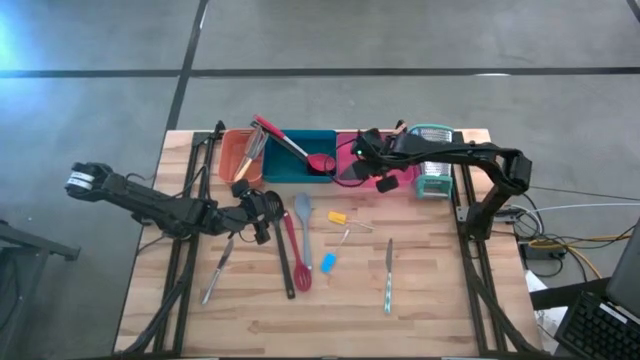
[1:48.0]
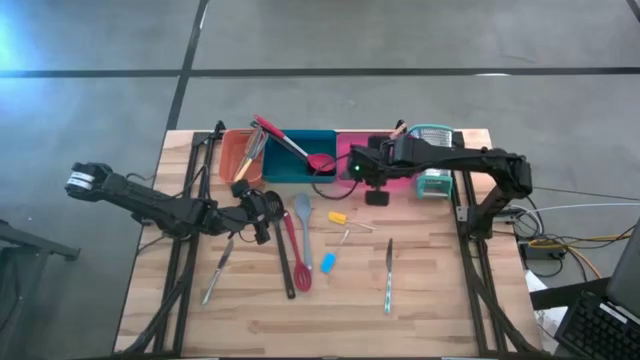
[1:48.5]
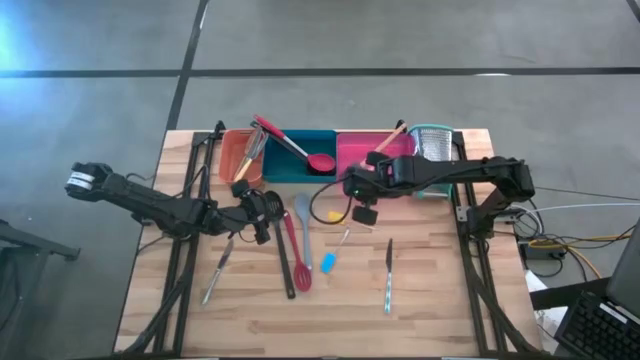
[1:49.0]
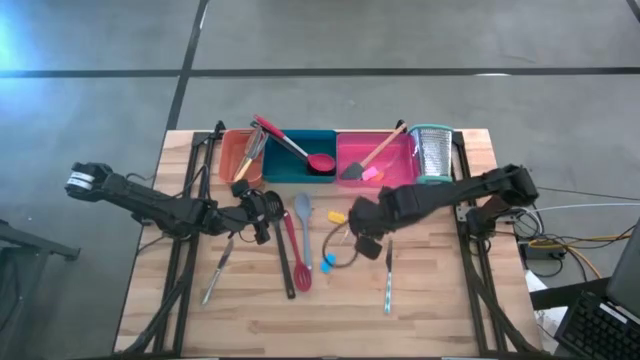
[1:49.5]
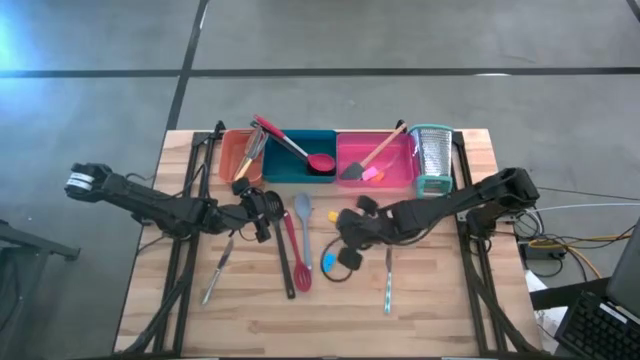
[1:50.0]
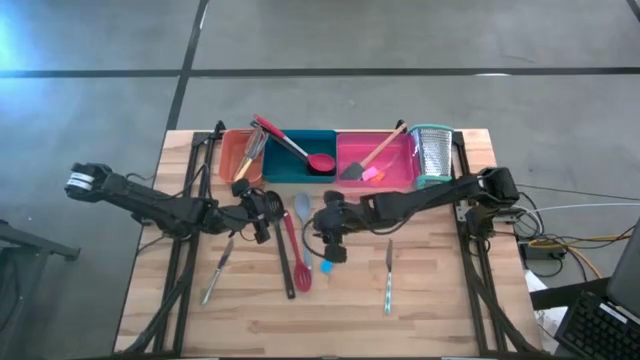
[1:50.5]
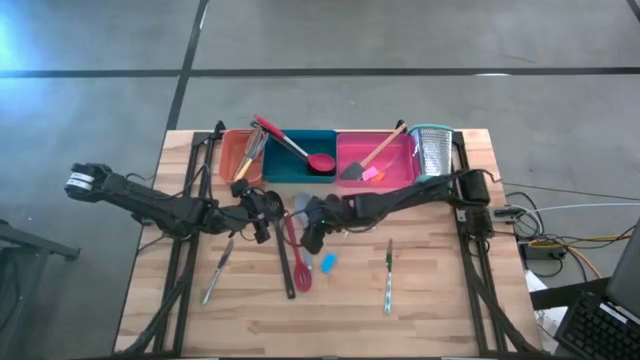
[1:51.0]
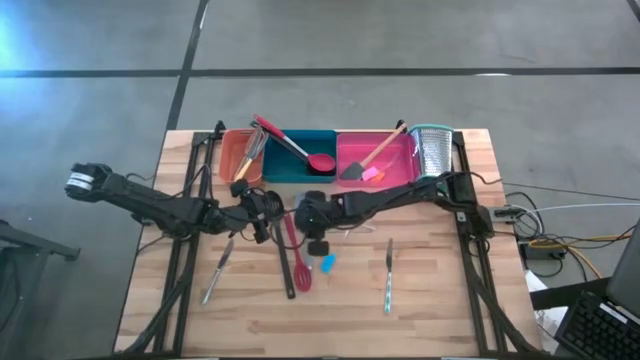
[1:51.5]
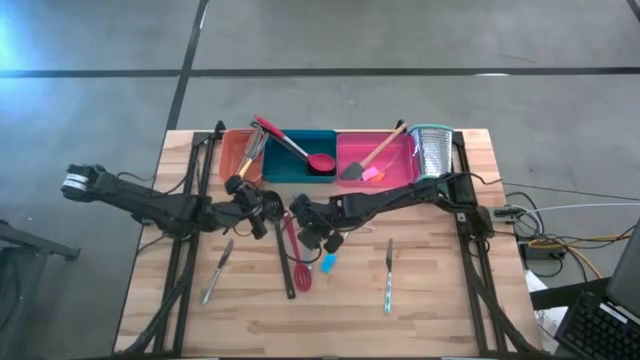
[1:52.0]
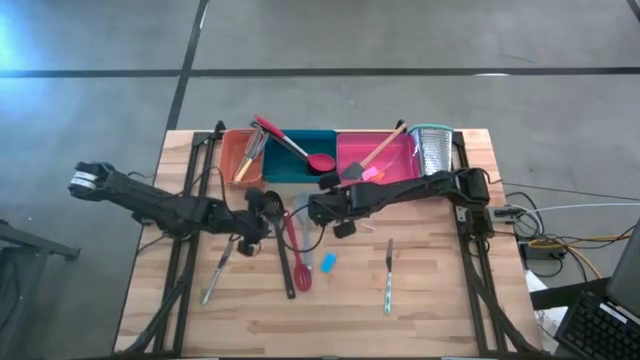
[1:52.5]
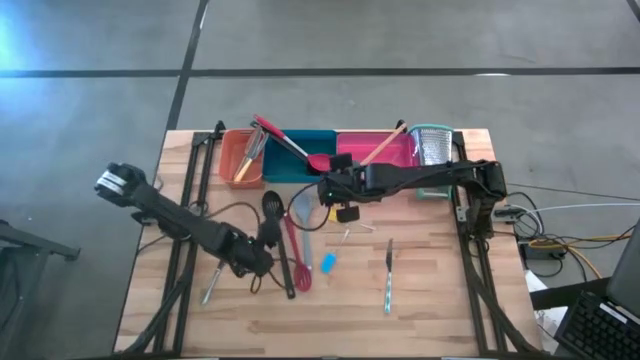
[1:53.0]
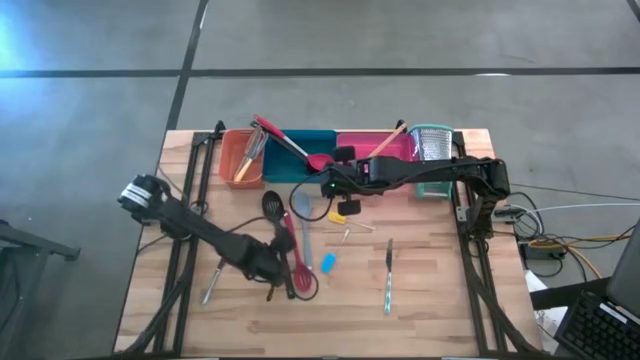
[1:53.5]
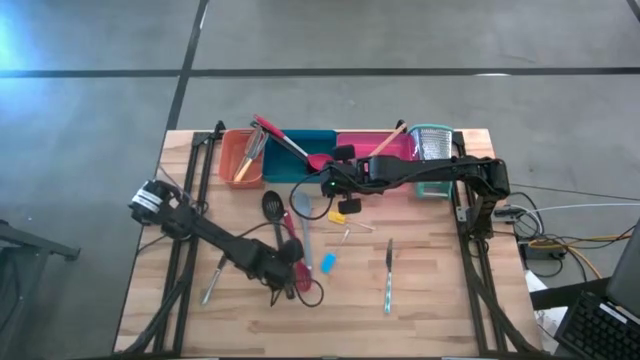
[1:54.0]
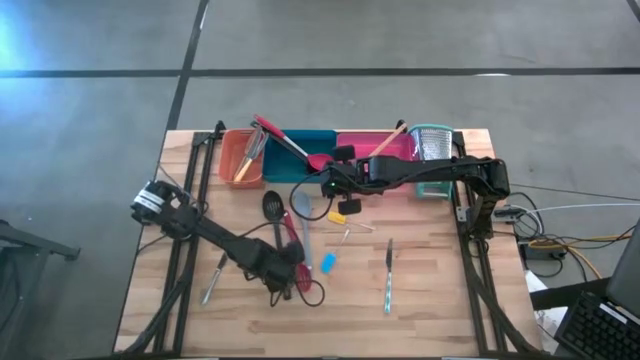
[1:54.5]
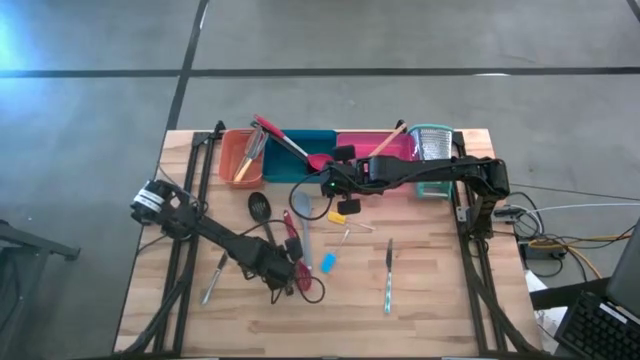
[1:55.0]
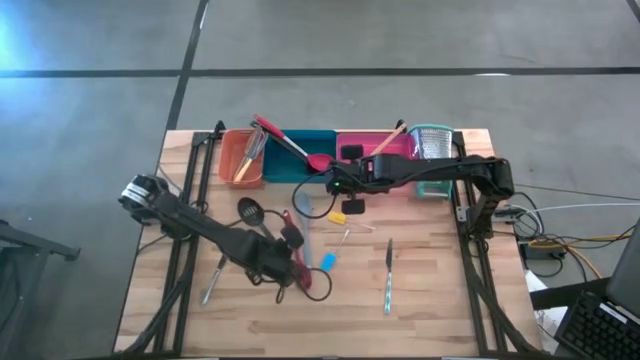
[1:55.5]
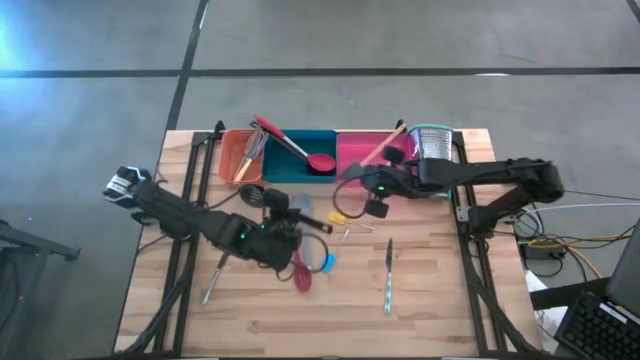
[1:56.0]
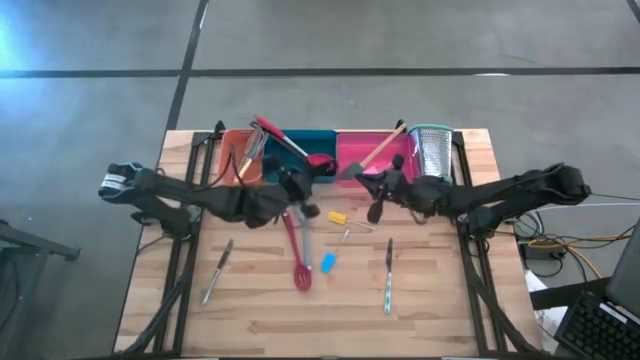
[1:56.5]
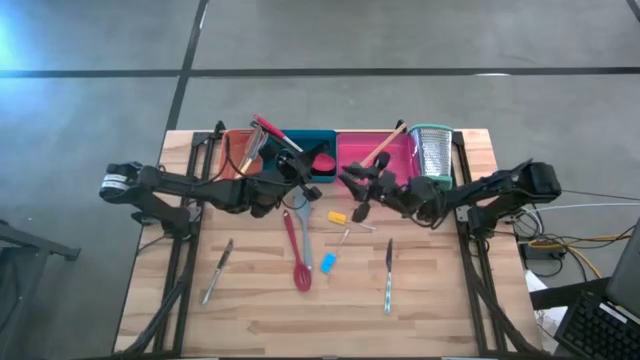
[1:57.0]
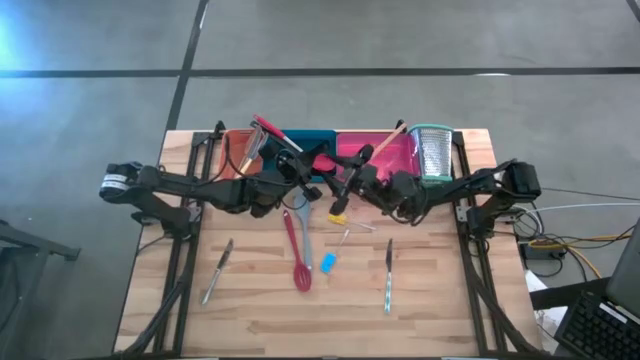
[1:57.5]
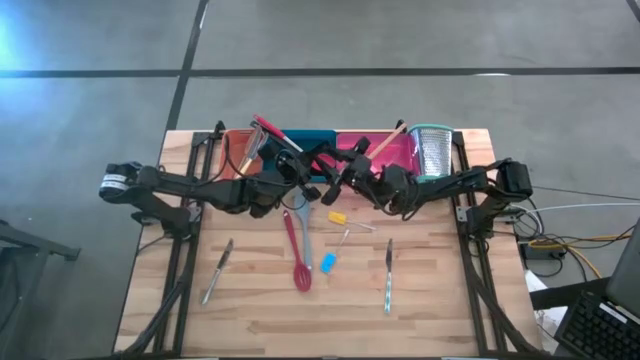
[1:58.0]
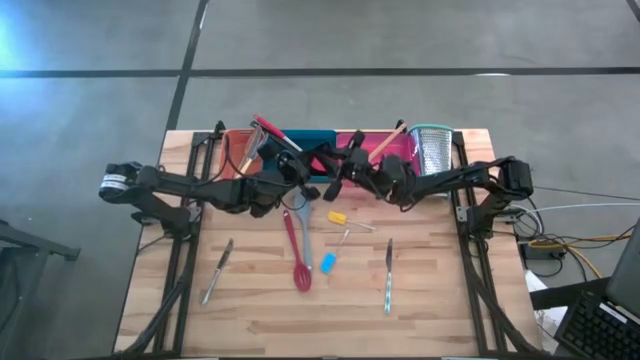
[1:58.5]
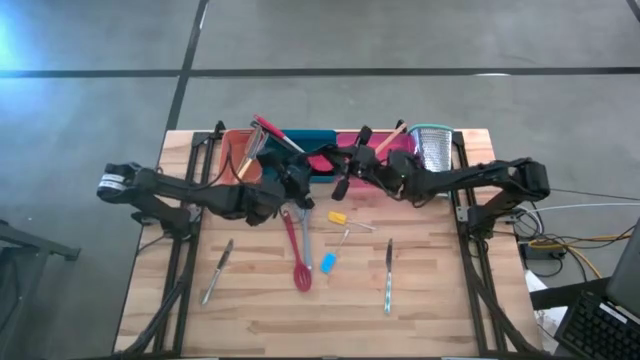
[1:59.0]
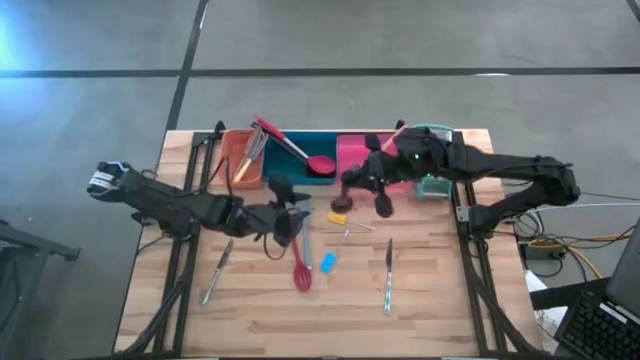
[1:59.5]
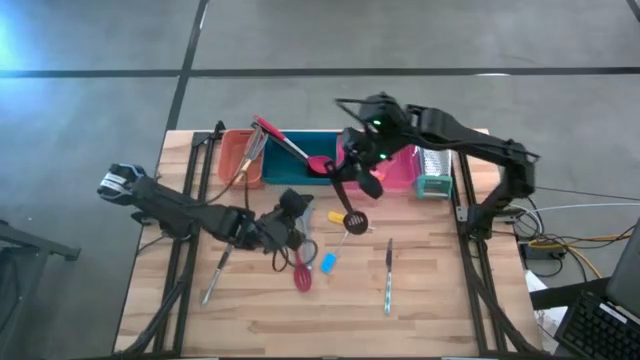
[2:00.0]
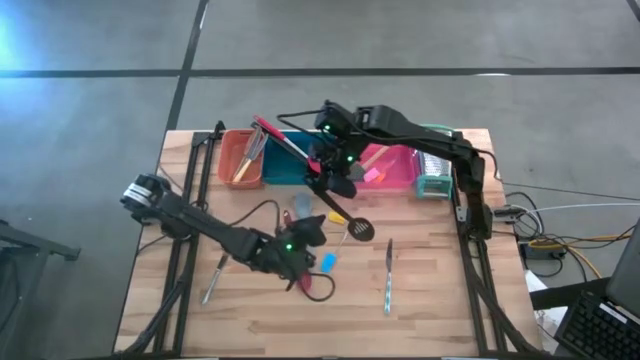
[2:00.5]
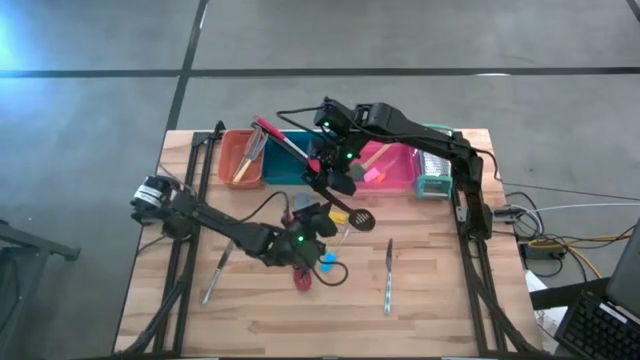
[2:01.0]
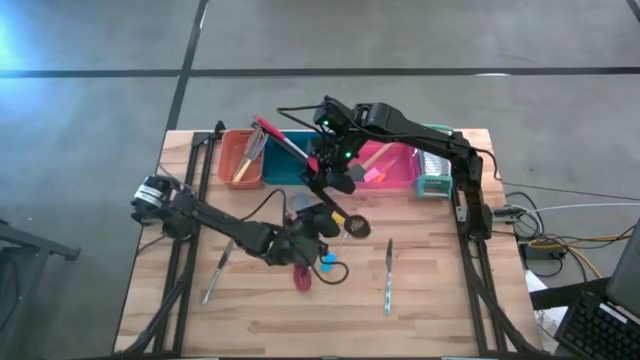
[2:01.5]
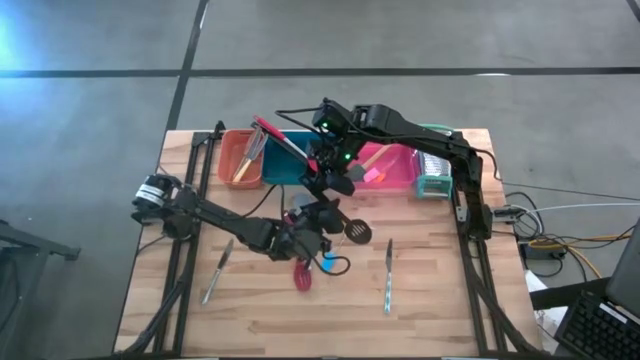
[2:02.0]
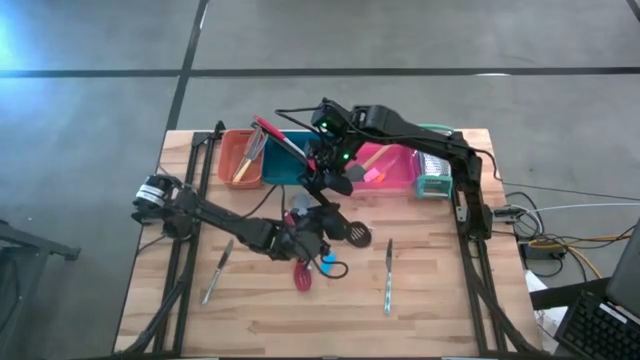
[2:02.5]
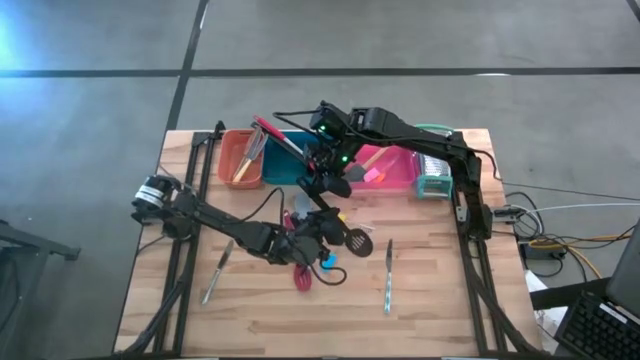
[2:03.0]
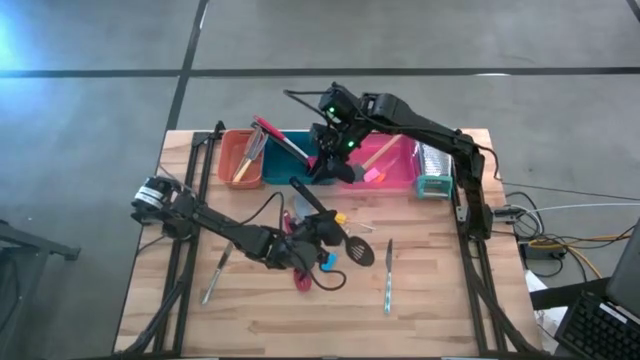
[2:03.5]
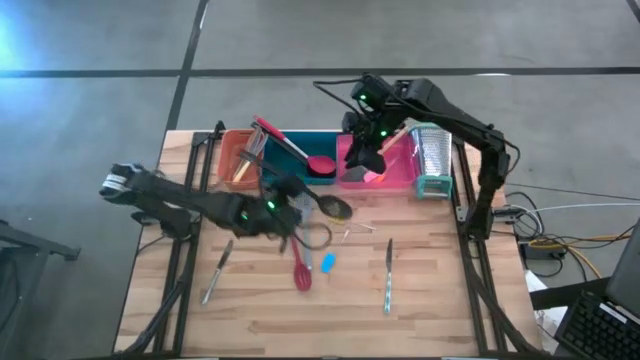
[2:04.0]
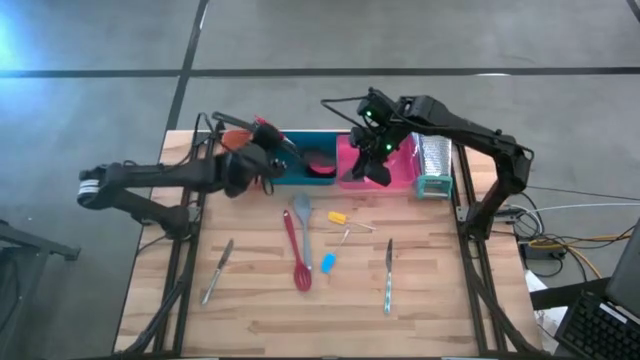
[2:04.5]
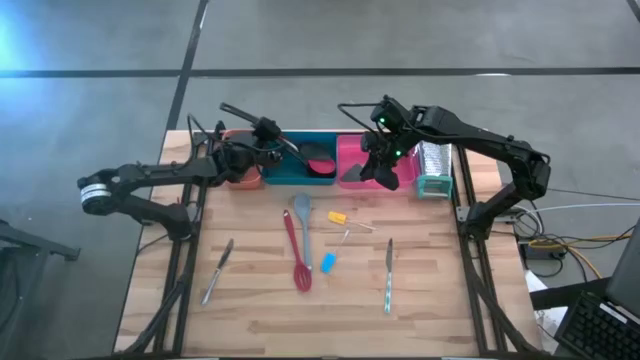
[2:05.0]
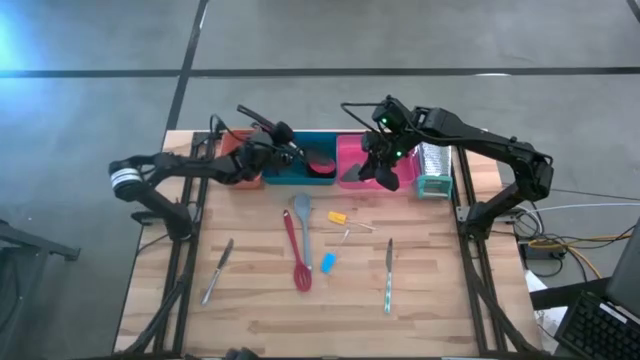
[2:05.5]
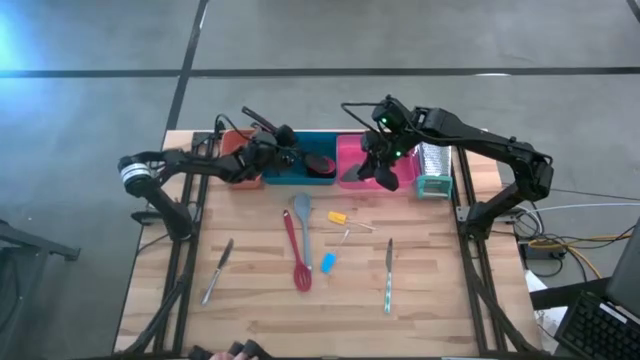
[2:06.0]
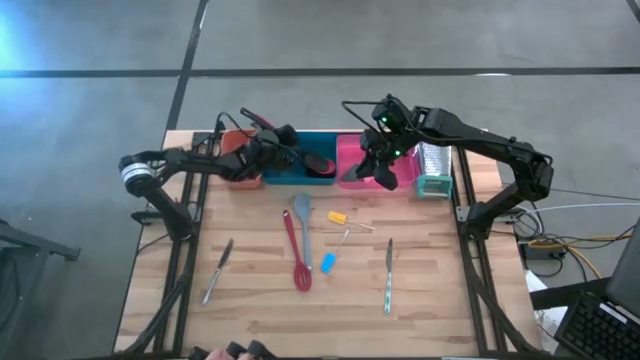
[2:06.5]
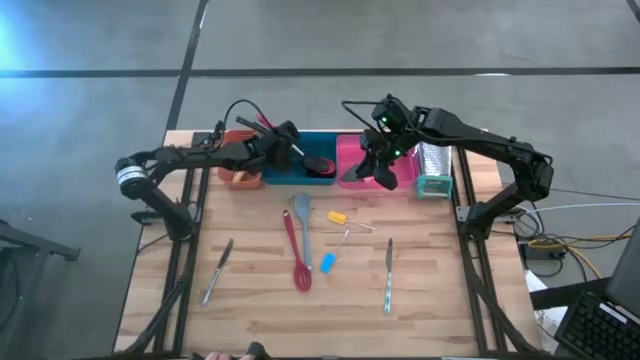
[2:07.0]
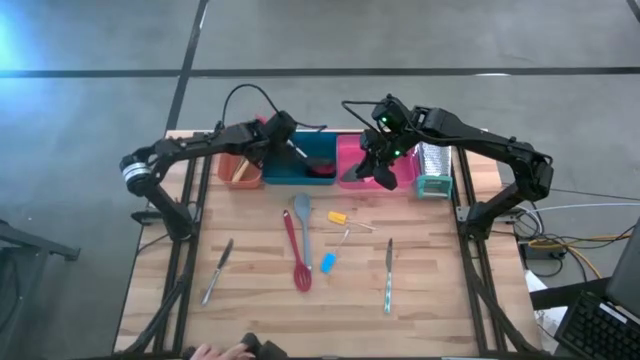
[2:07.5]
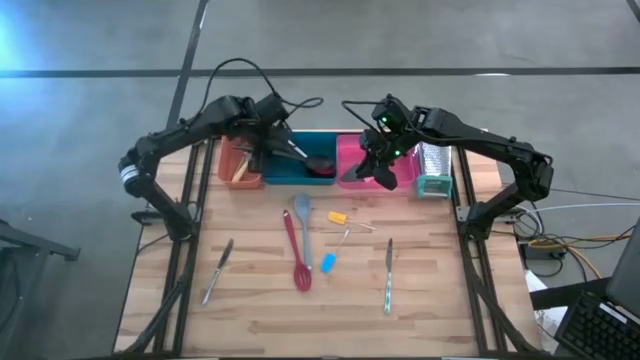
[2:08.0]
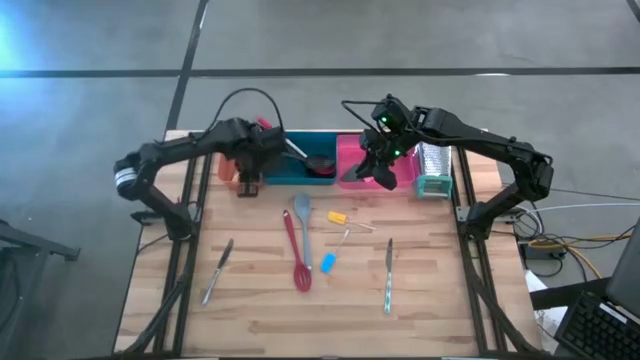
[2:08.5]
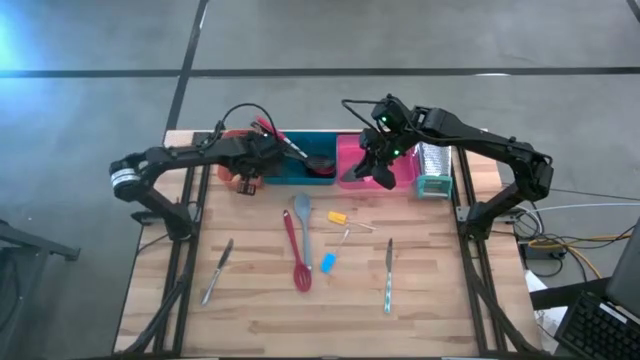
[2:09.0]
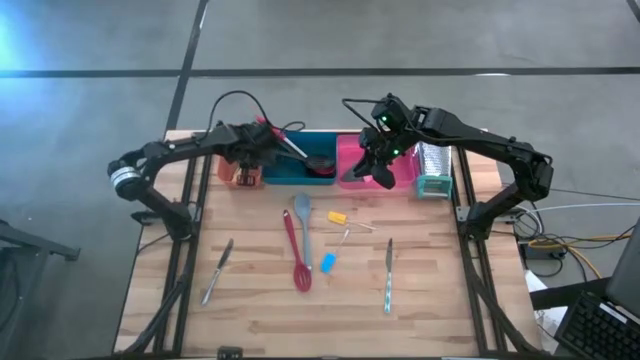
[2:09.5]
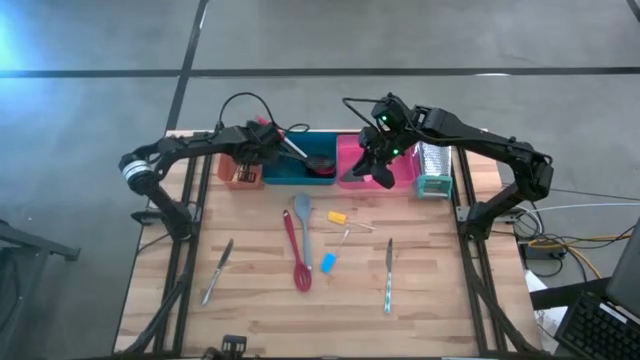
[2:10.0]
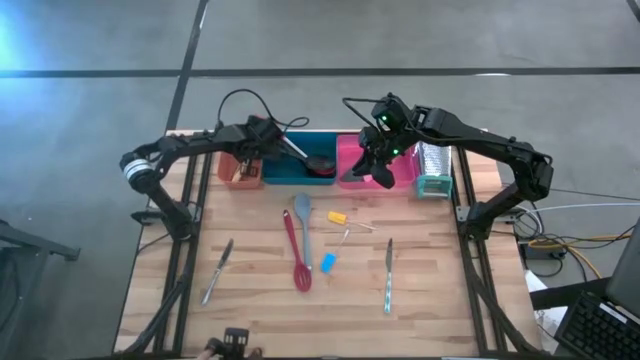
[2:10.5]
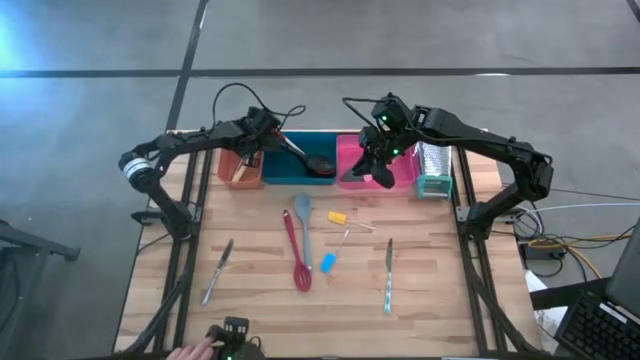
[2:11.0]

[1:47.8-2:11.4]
Task: Pick & Place Kitchen Items
Put the black slotted spoon into the blue bin
